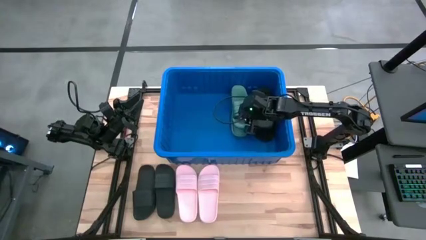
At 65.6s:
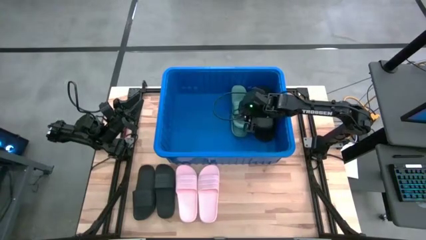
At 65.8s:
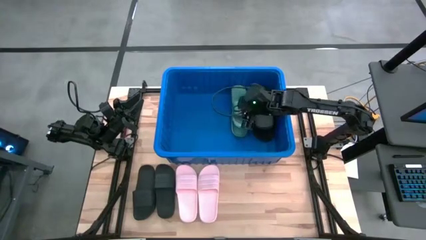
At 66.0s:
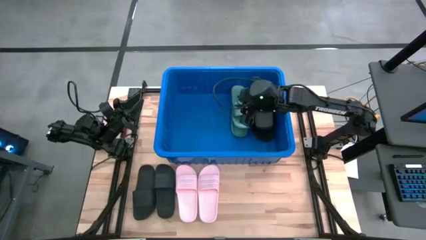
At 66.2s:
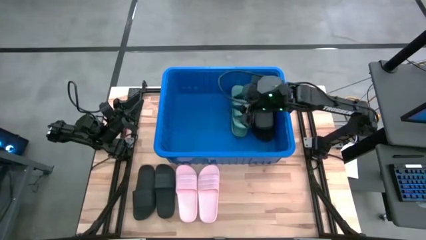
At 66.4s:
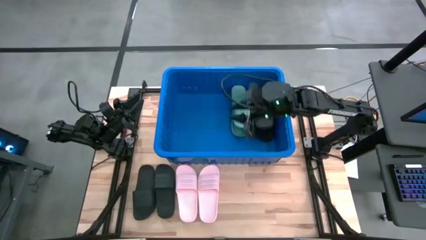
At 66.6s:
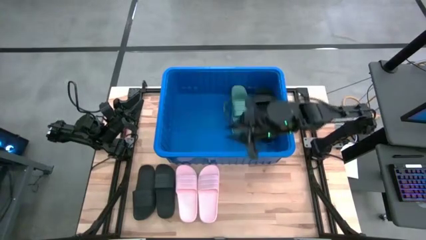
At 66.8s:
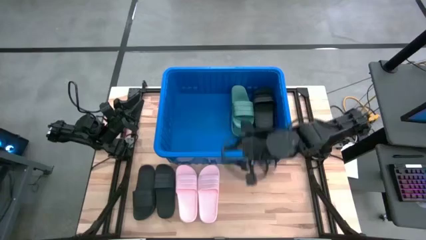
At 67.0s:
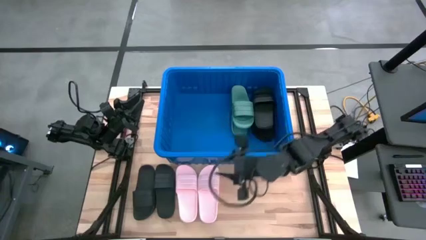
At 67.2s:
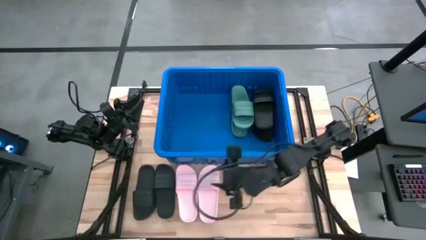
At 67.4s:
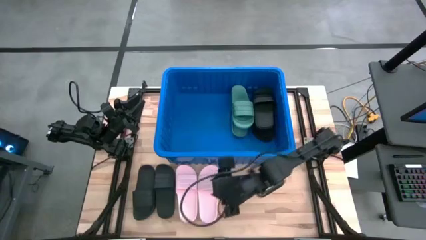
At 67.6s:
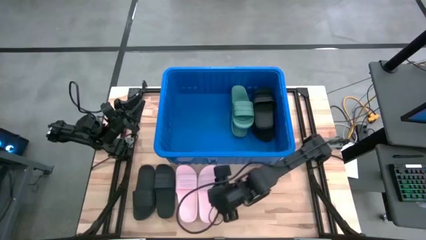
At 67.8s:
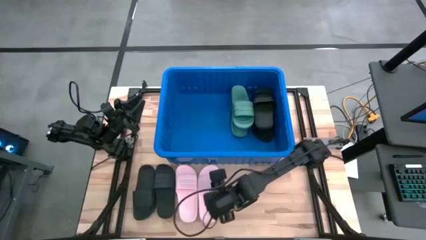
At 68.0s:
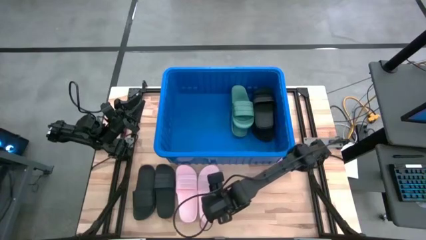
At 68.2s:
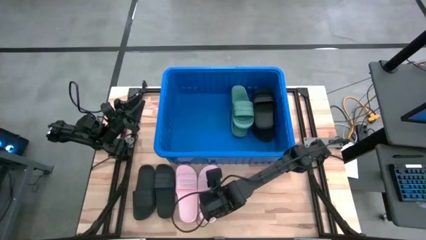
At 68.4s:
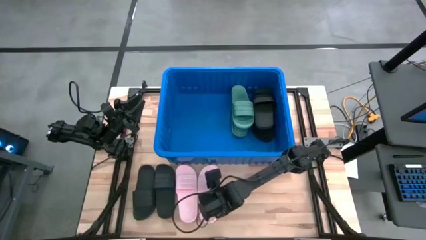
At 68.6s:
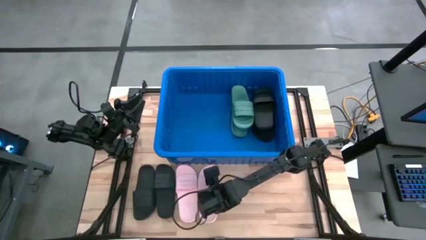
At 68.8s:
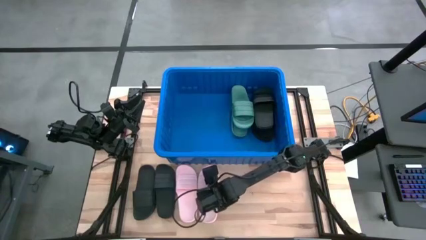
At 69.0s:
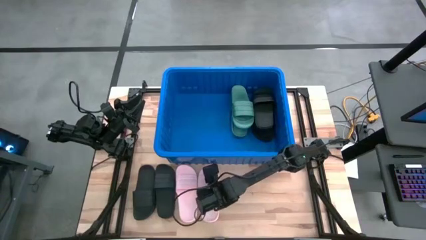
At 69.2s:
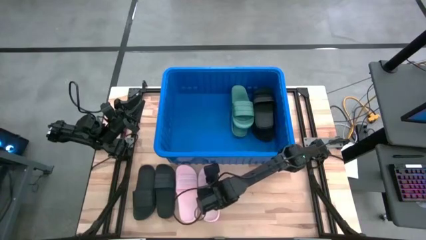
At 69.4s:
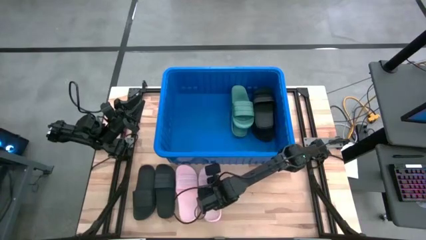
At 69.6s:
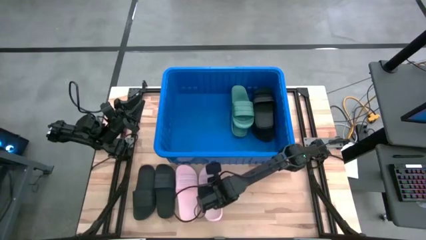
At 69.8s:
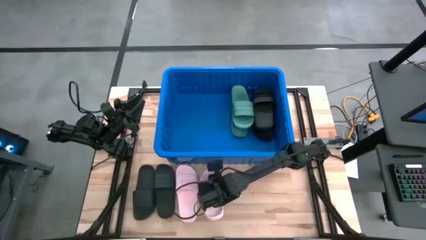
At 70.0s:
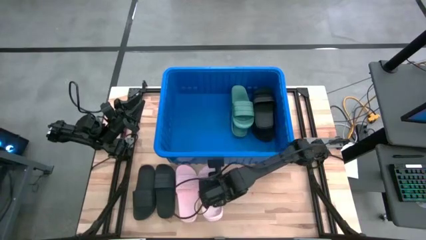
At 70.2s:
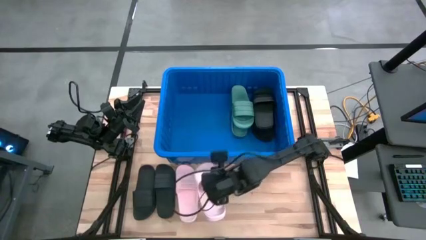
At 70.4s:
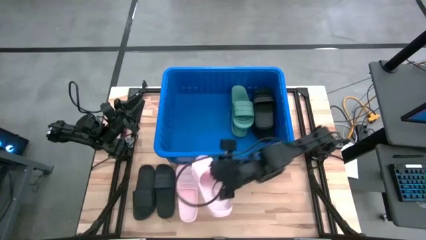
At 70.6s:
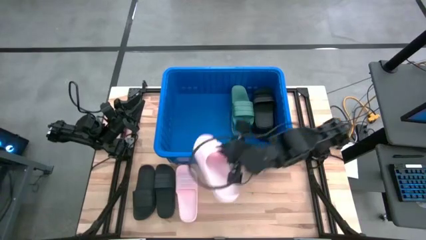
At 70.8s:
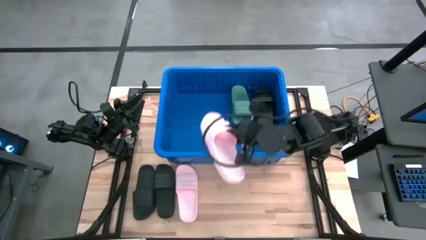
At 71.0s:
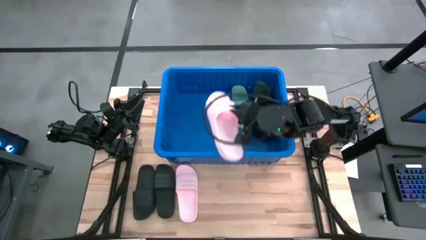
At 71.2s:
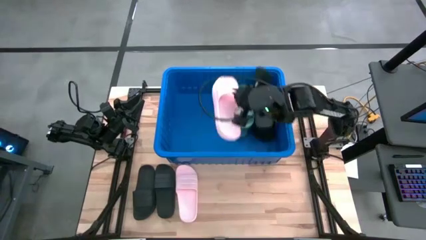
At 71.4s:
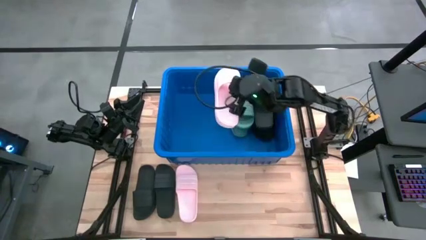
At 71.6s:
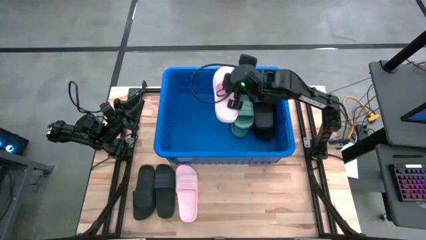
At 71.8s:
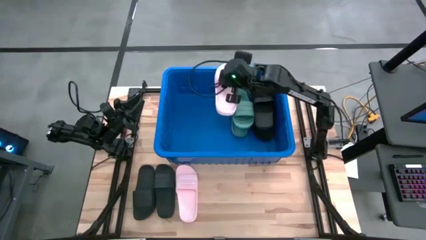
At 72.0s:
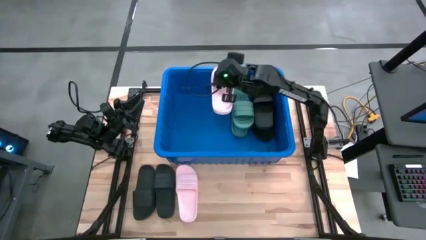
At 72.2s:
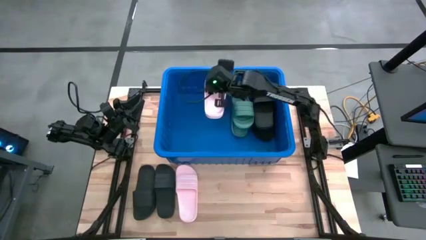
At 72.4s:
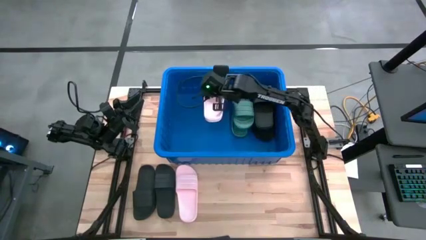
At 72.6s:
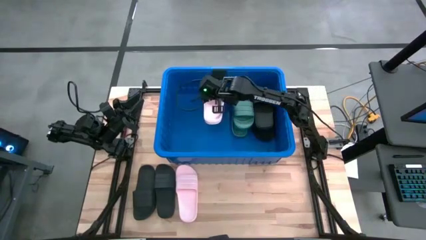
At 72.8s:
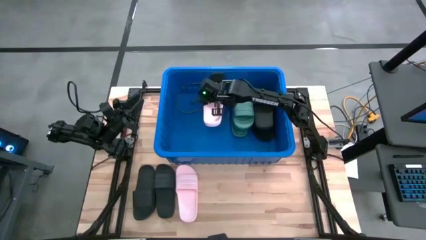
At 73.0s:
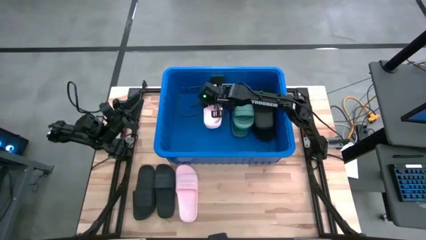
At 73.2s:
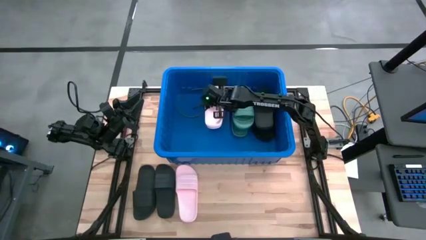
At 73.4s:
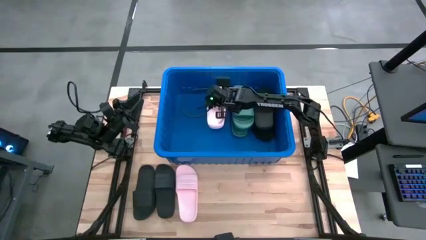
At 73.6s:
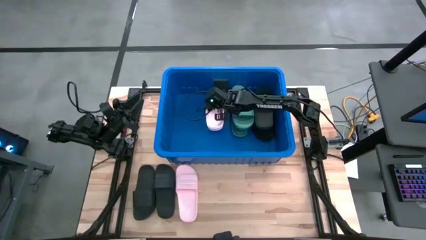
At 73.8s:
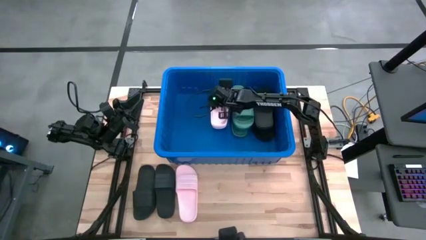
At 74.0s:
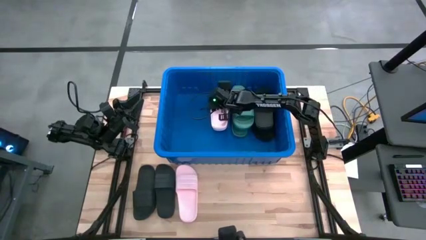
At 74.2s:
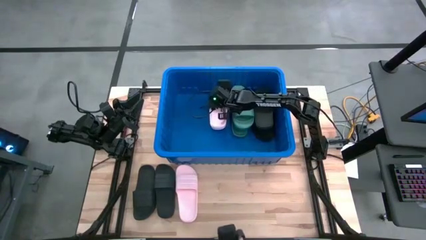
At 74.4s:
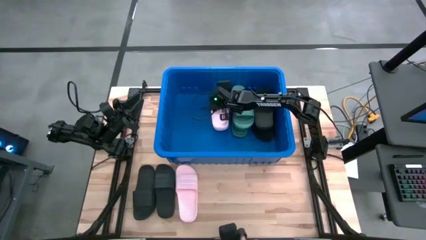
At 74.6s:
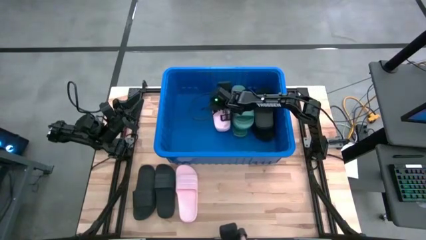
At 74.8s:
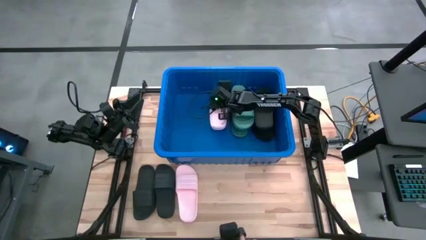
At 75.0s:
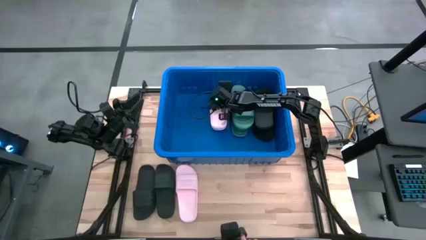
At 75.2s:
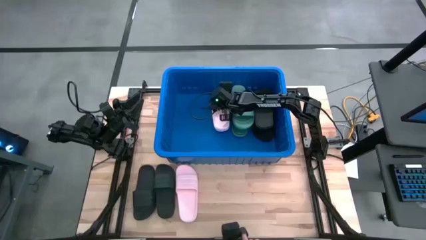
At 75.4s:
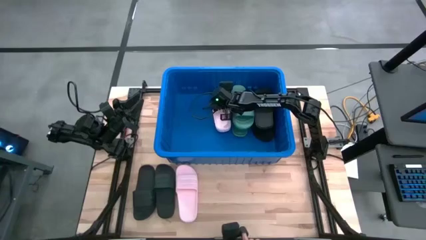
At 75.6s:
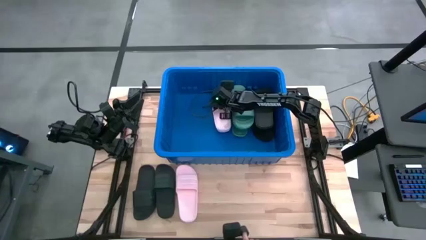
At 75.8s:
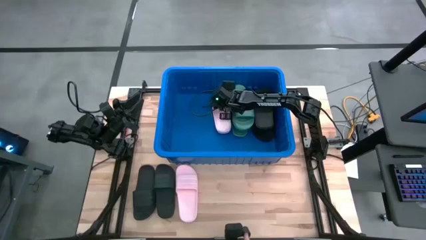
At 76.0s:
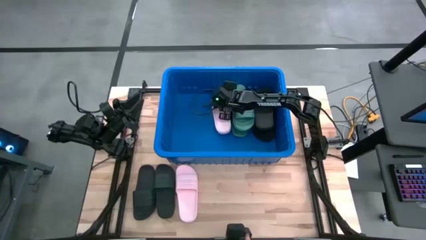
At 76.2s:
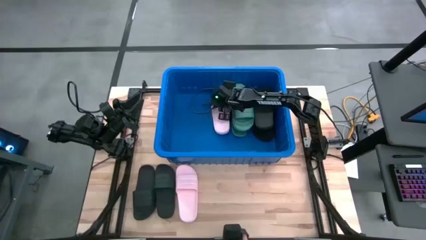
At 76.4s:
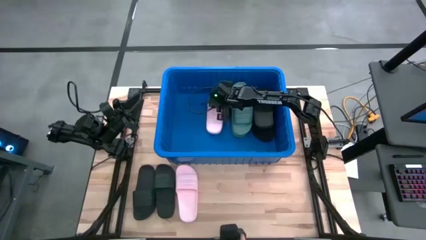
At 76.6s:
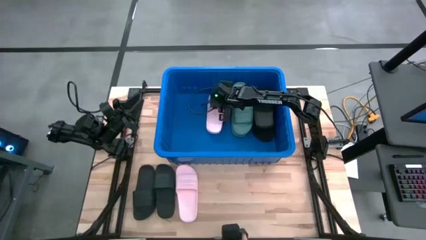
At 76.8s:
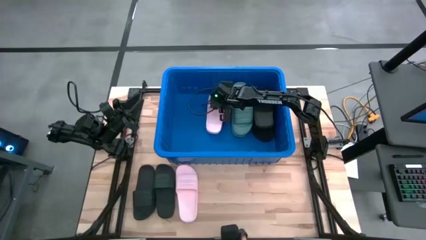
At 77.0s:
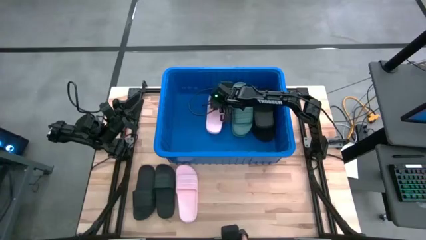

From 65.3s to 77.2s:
Task: Pick and place slides into bin
Put the pink slide into the bin
